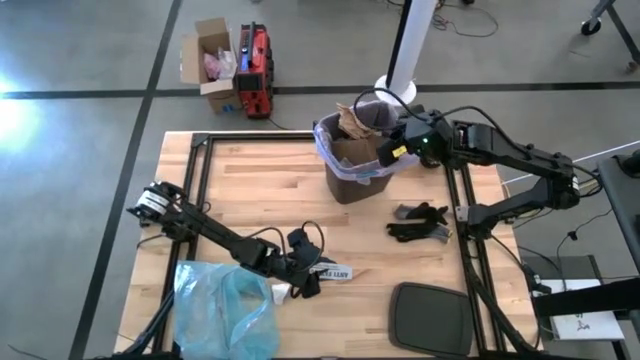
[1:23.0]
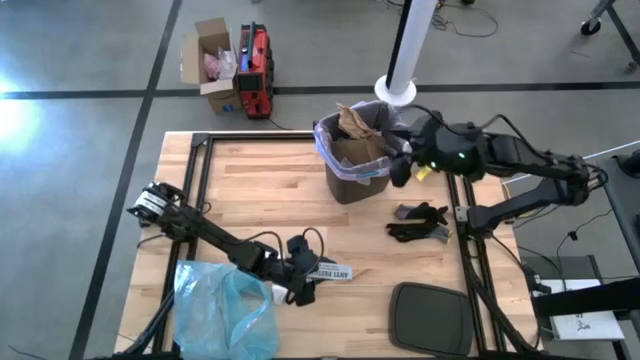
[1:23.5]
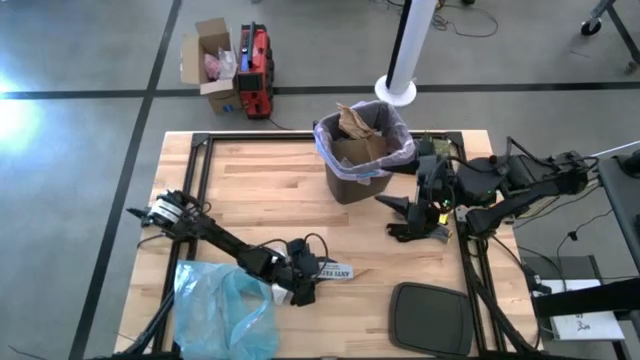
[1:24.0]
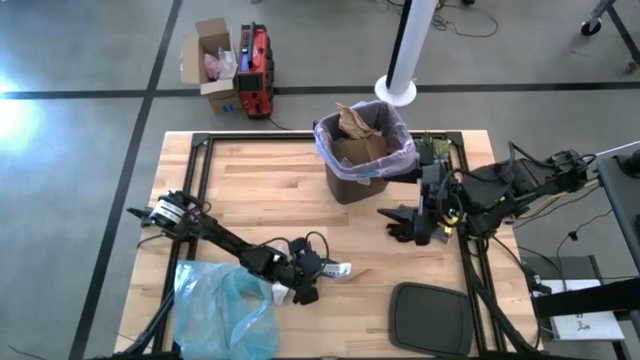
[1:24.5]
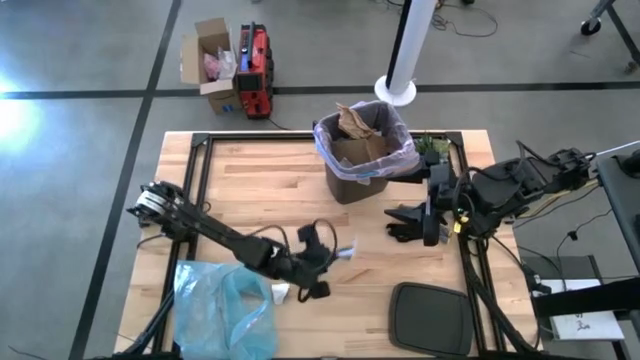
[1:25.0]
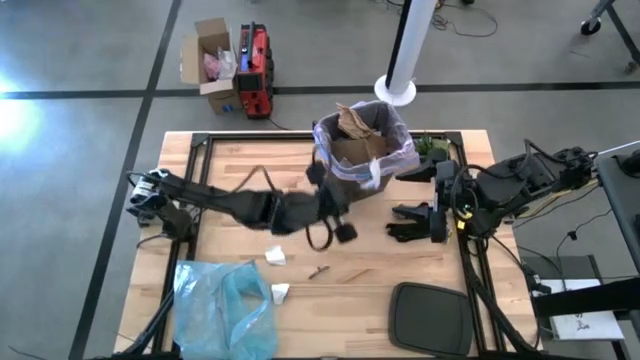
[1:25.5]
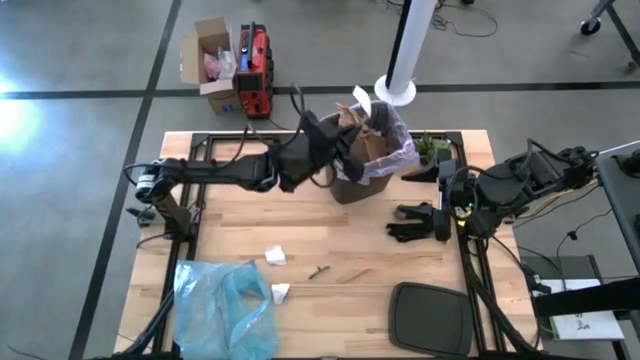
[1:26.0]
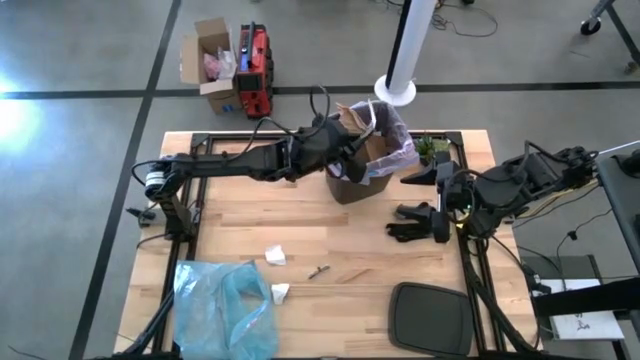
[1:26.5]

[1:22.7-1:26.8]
Task: place trash/remove bag and relplace
Put the white paper into the trash bin

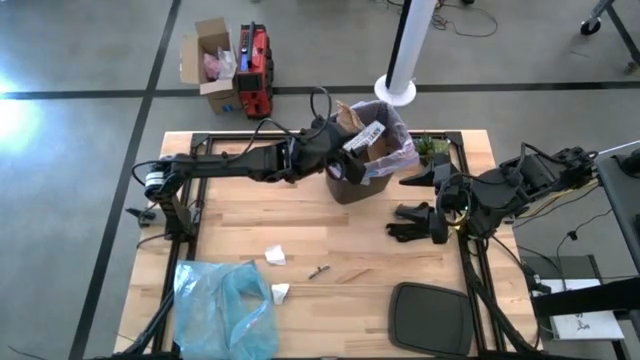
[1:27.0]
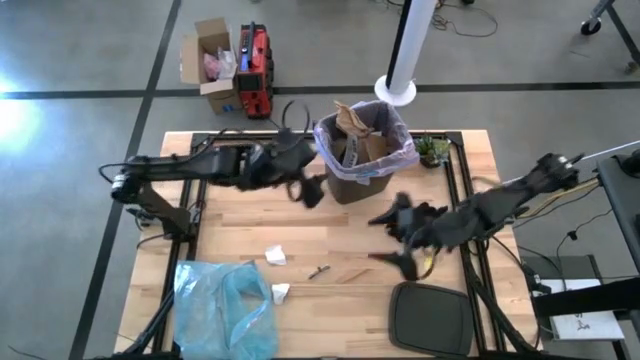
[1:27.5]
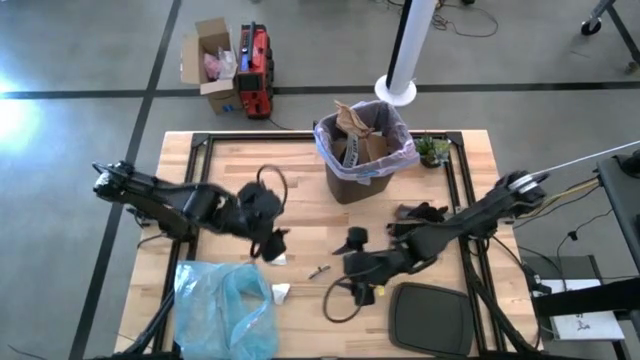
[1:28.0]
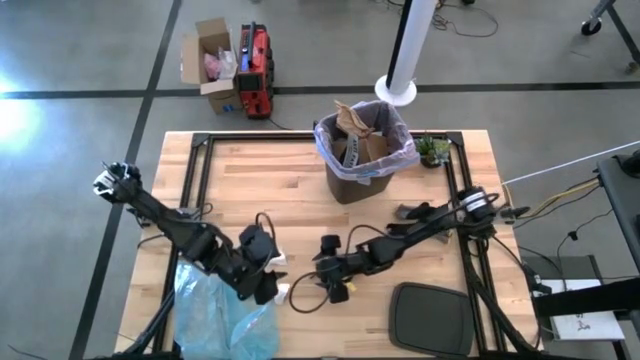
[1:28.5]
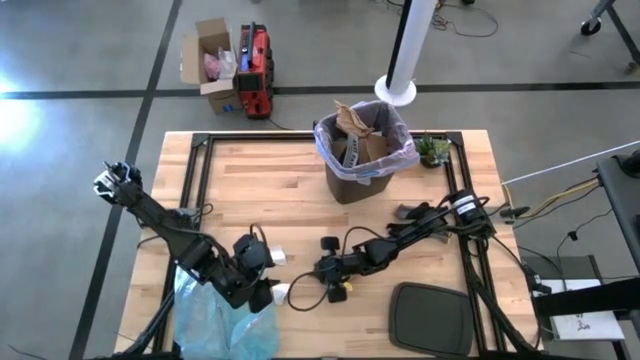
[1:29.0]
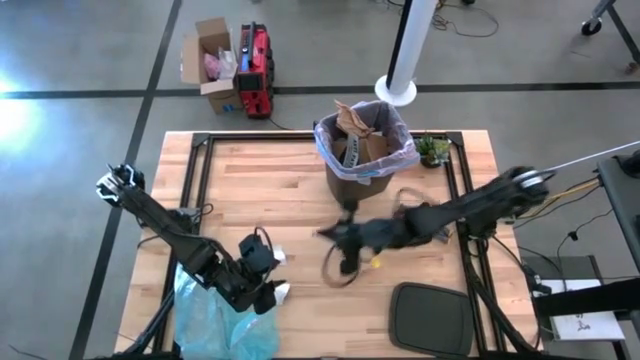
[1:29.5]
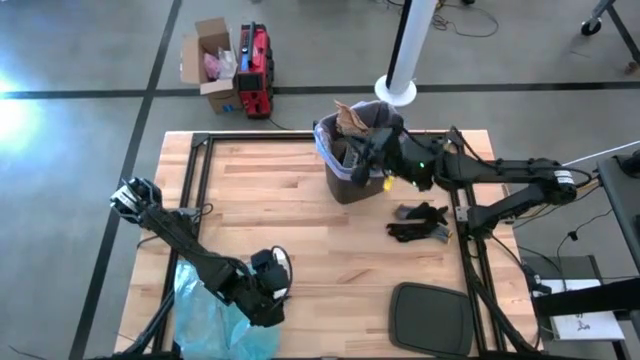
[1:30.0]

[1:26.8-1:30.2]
Put the wires into the trash bin

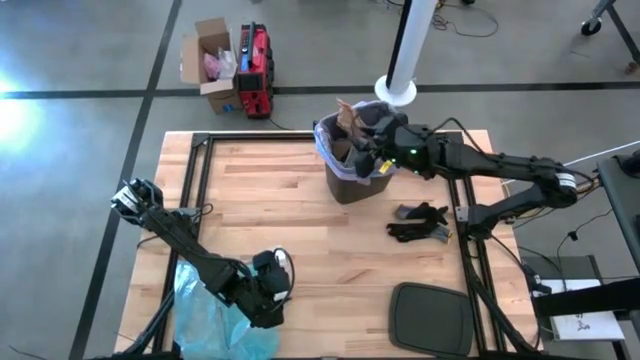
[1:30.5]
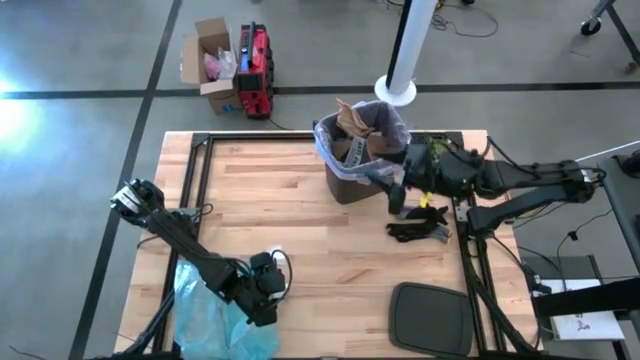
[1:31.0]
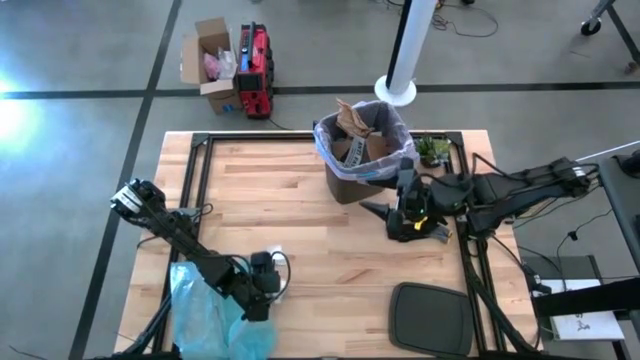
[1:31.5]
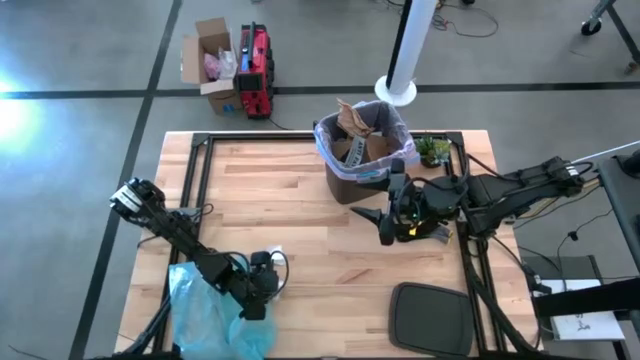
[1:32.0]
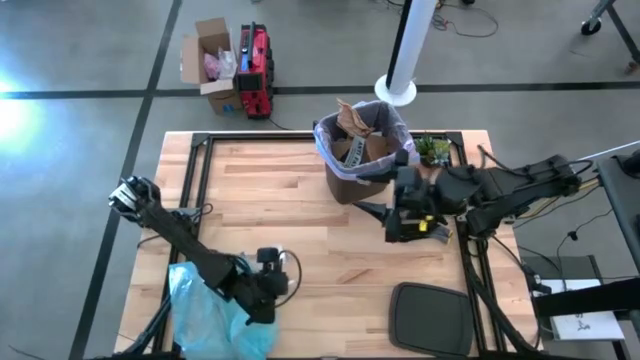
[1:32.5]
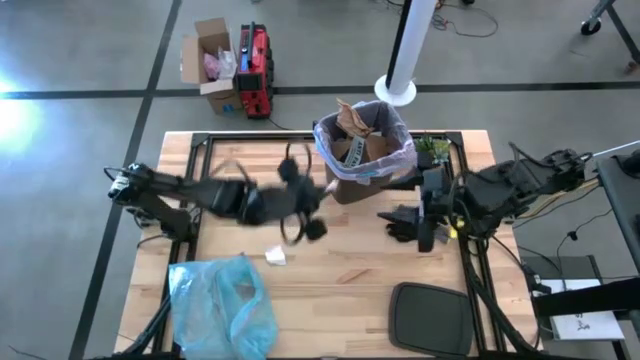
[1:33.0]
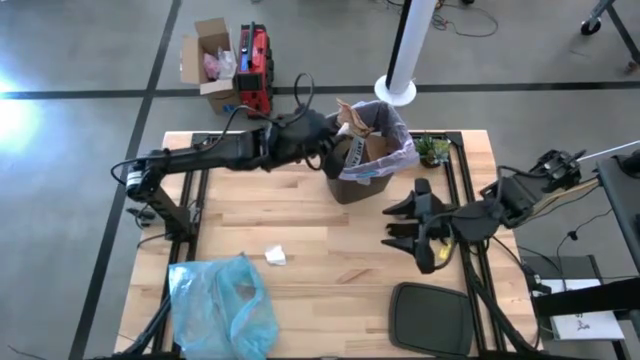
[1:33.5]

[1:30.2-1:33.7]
Put the white paper into the trash bin

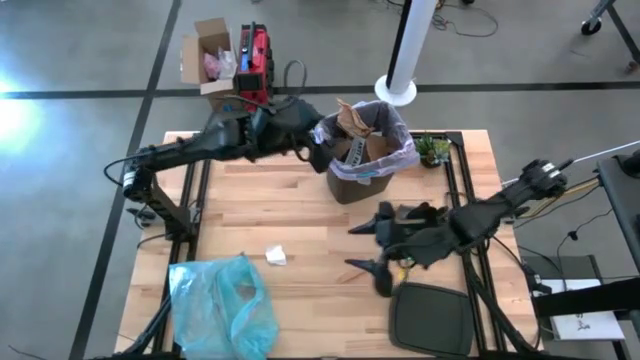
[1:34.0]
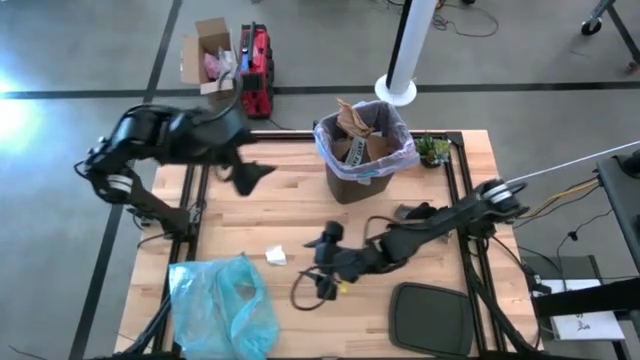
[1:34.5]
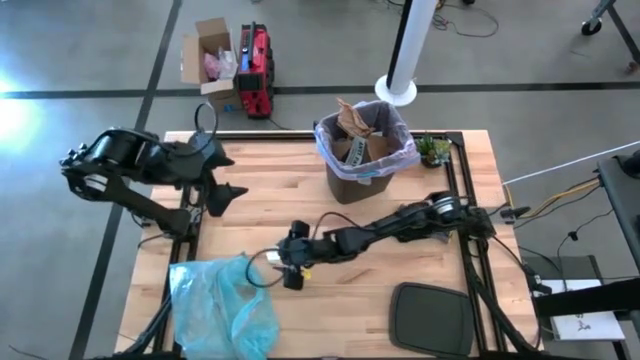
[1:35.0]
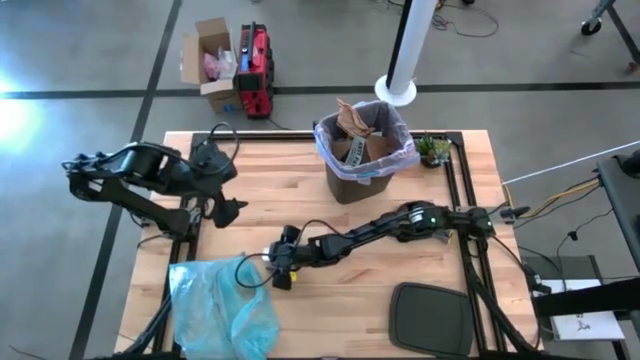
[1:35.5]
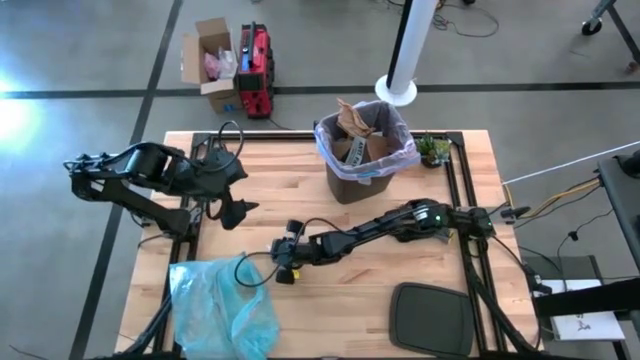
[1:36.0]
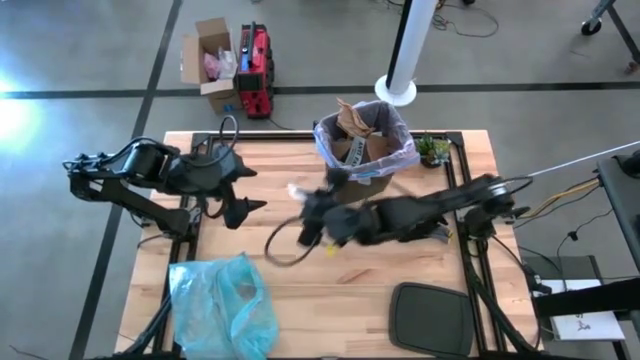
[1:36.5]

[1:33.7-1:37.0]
Put the white paper into the trash bin

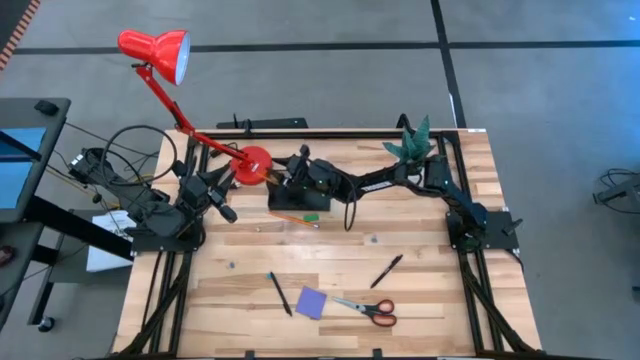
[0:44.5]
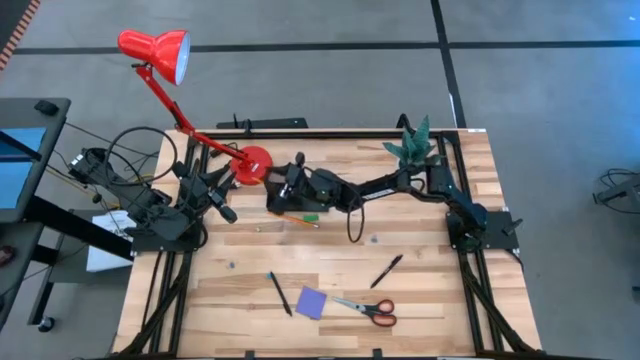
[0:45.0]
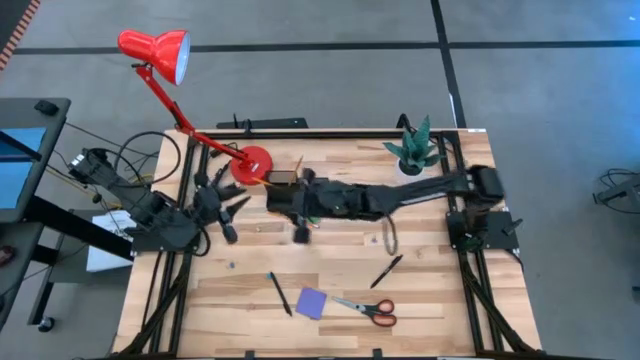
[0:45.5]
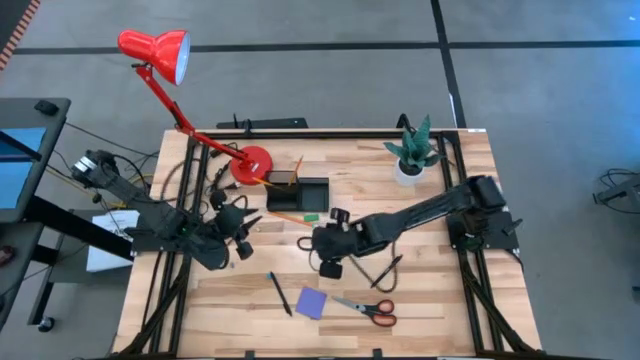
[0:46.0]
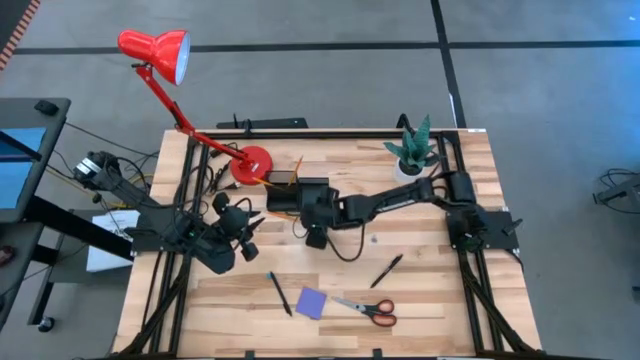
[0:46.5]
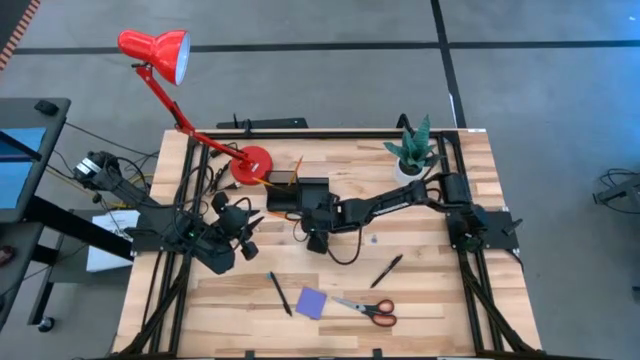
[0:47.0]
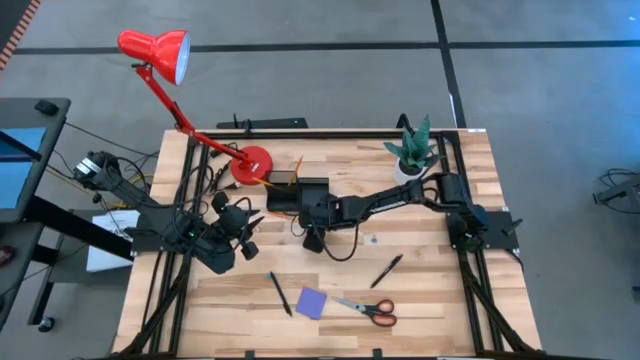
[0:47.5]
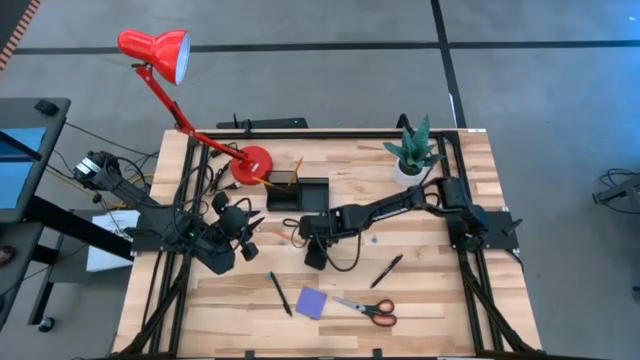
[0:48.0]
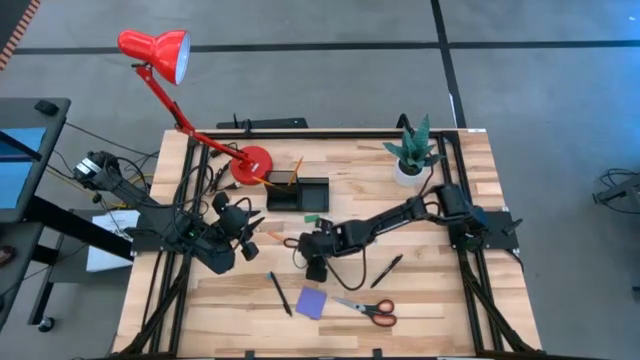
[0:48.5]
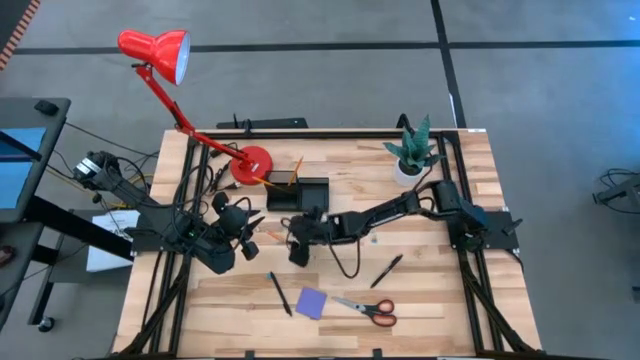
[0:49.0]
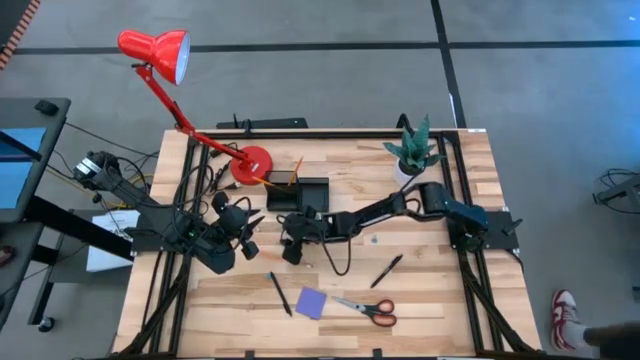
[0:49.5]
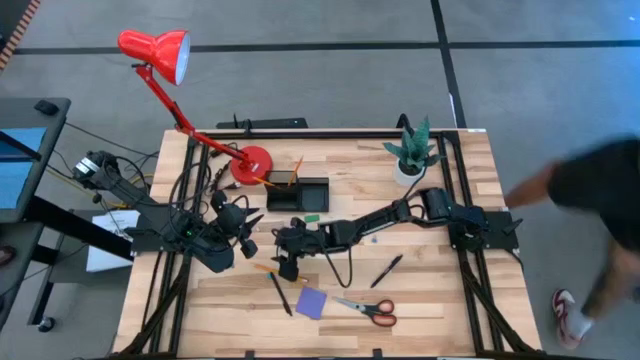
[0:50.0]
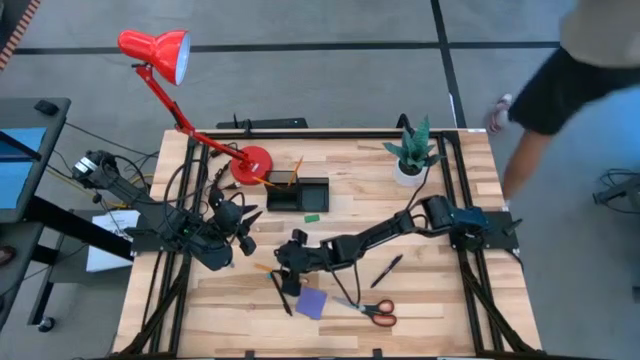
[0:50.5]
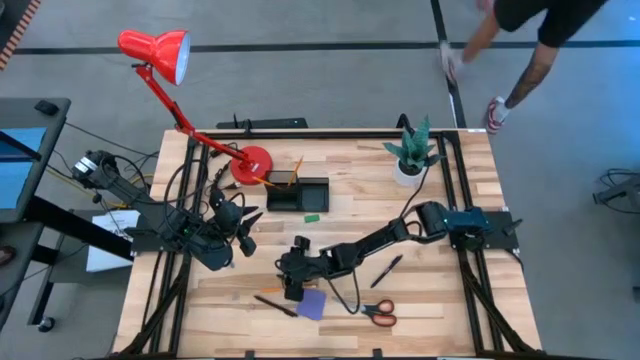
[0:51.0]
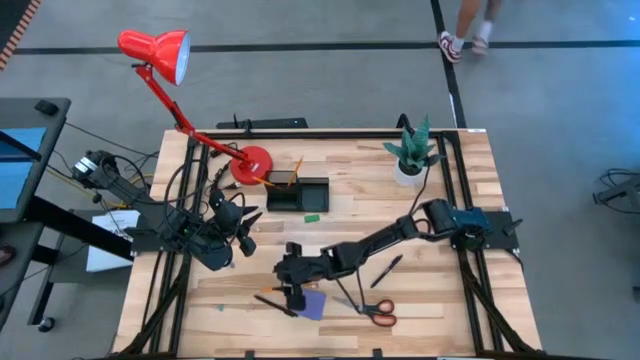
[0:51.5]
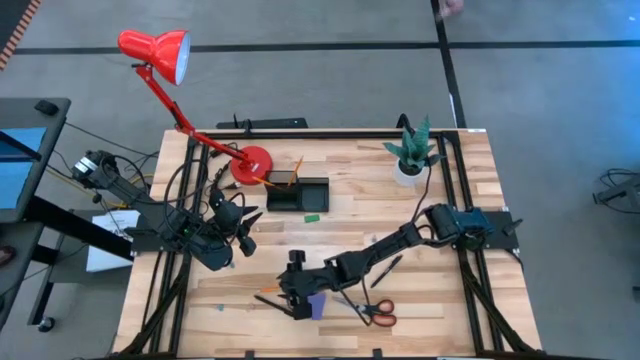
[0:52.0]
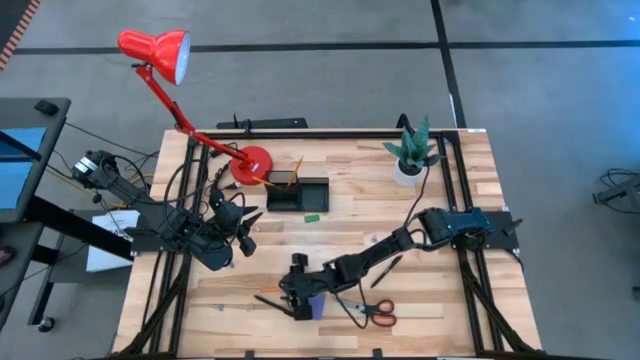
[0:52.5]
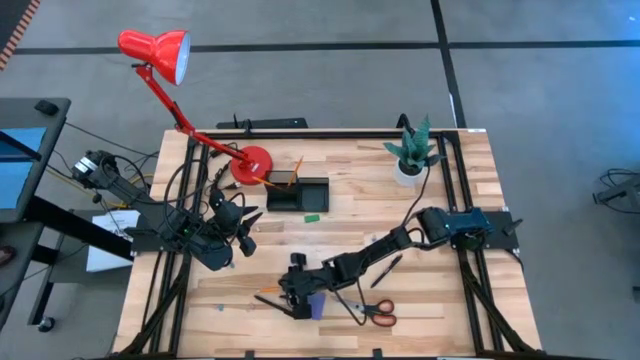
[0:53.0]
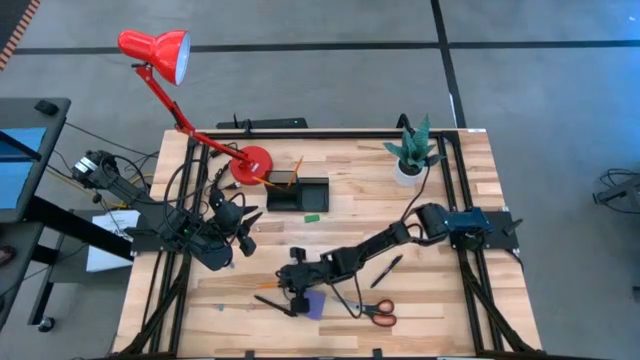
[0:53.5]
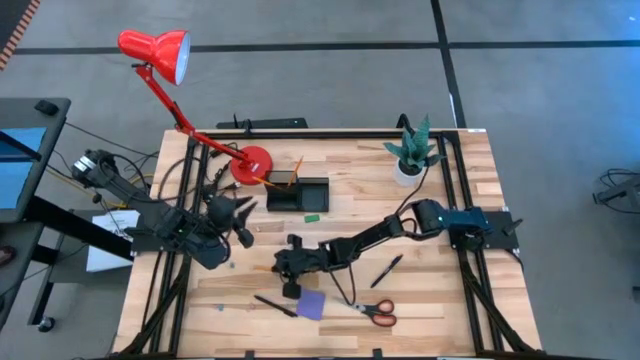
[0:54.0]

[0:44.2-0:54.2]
Task: Pick and place office supplies into organizer
Put the yellow pencil into the black desk organizer
